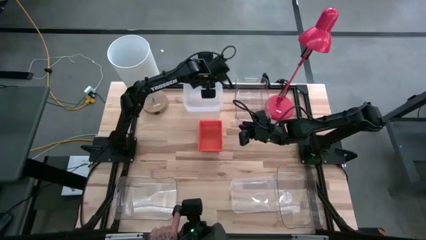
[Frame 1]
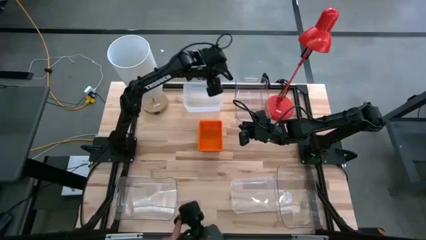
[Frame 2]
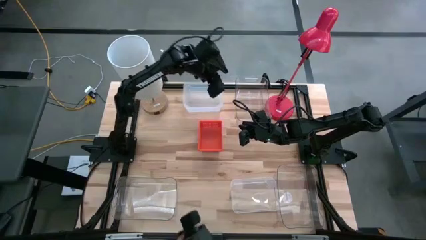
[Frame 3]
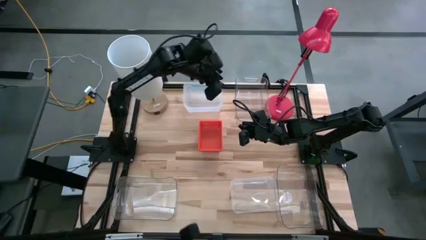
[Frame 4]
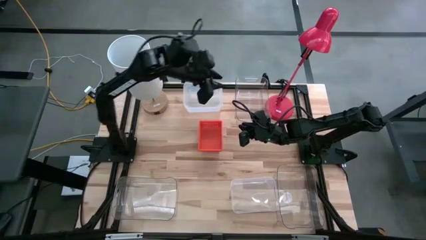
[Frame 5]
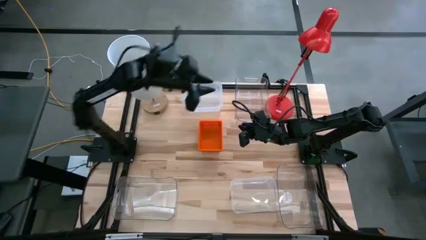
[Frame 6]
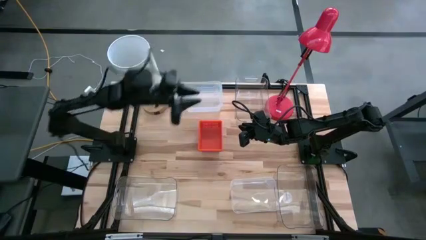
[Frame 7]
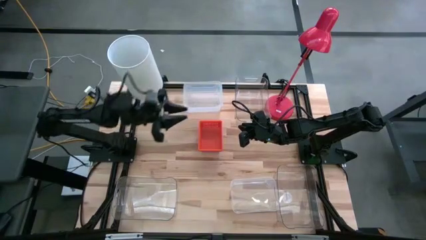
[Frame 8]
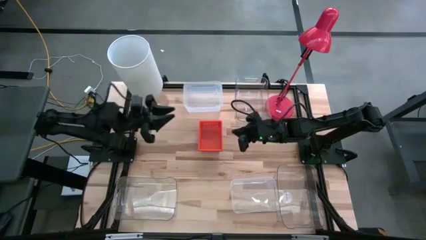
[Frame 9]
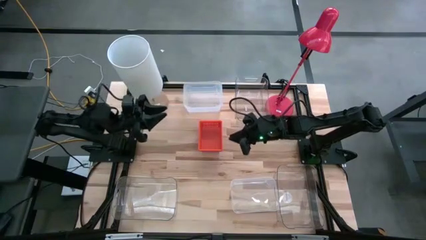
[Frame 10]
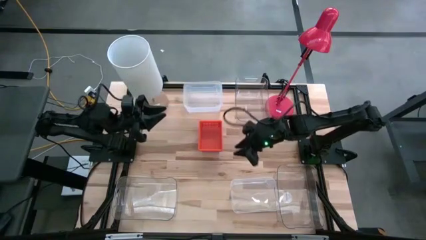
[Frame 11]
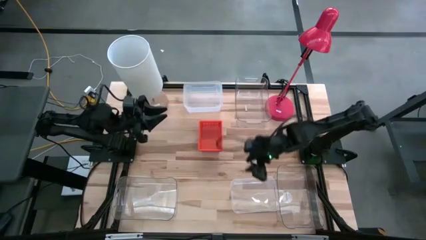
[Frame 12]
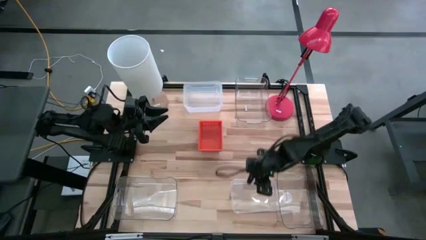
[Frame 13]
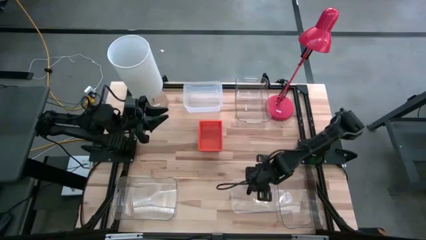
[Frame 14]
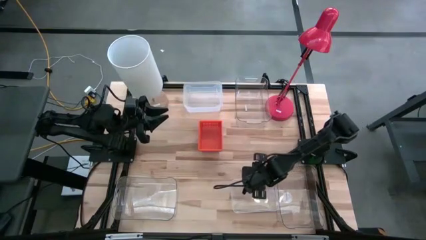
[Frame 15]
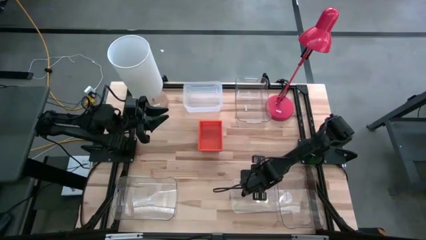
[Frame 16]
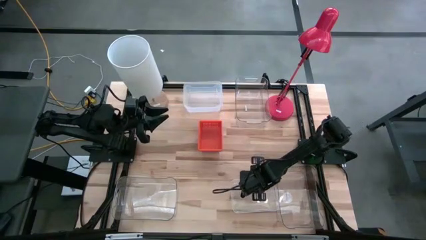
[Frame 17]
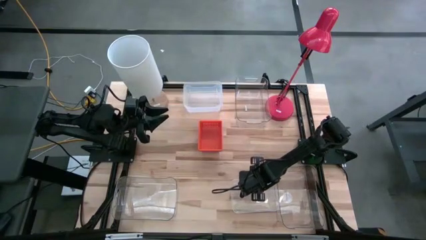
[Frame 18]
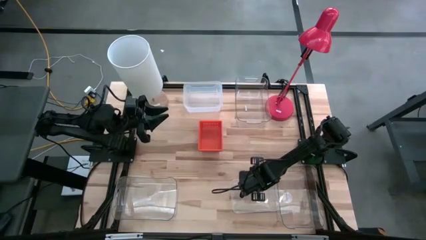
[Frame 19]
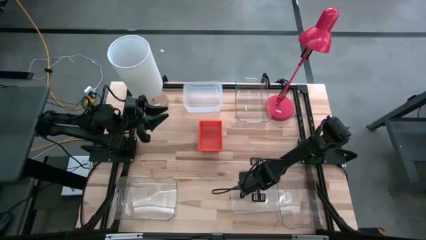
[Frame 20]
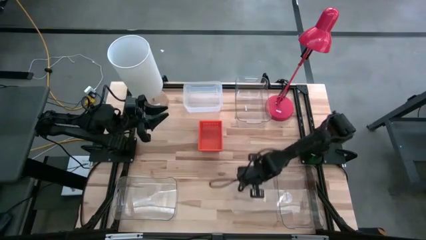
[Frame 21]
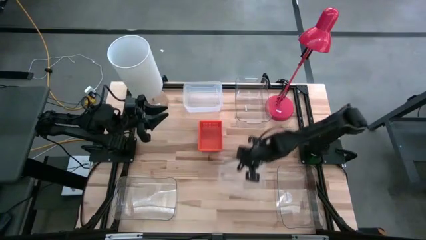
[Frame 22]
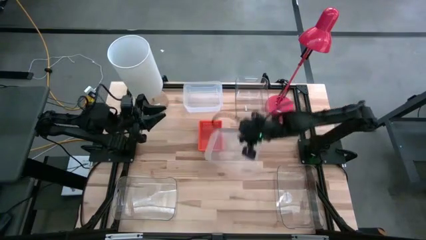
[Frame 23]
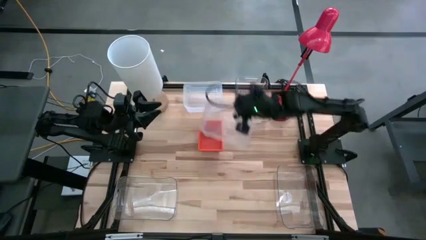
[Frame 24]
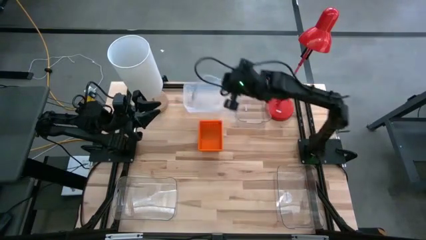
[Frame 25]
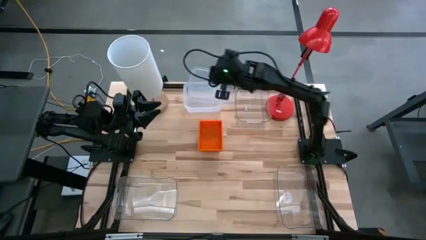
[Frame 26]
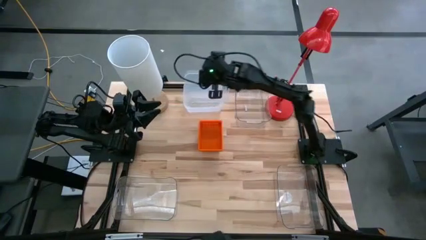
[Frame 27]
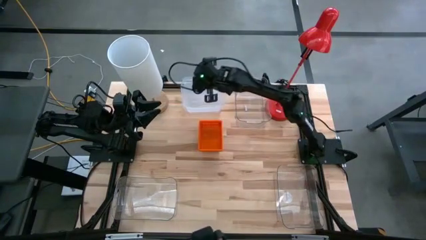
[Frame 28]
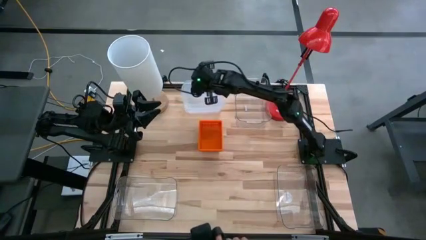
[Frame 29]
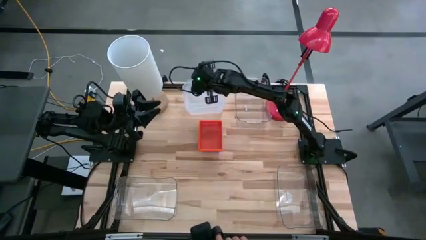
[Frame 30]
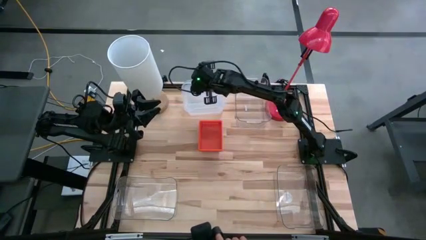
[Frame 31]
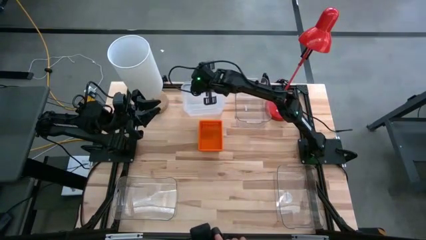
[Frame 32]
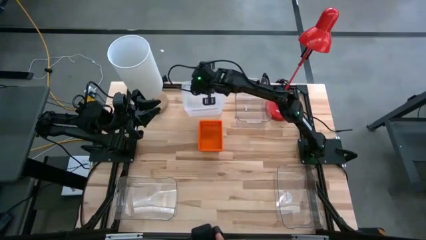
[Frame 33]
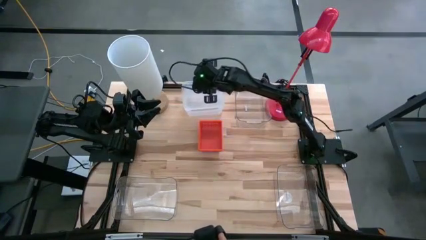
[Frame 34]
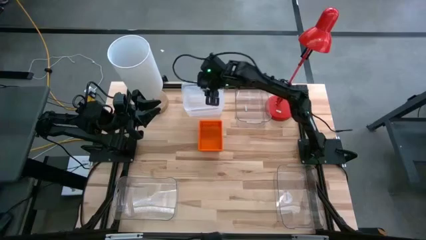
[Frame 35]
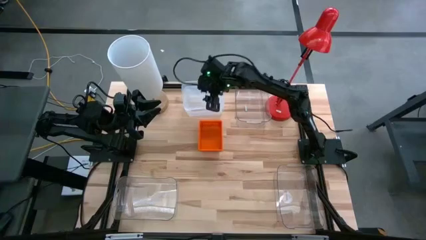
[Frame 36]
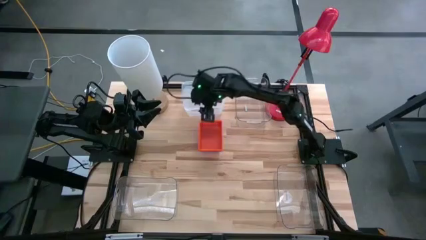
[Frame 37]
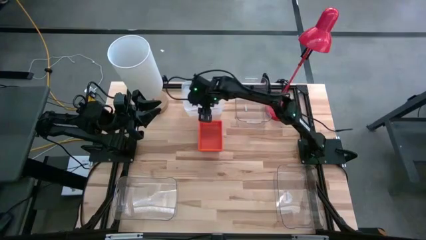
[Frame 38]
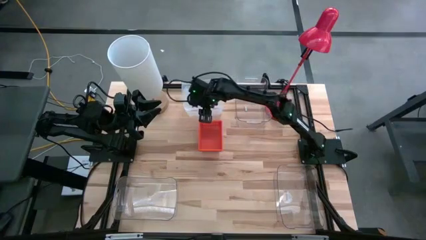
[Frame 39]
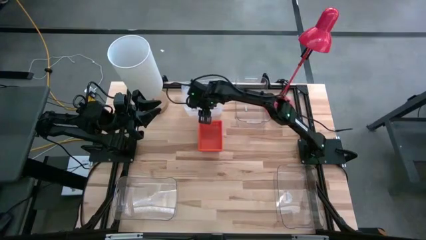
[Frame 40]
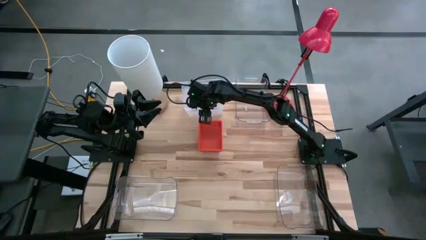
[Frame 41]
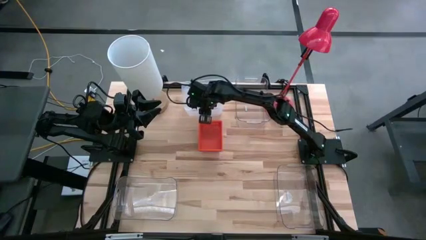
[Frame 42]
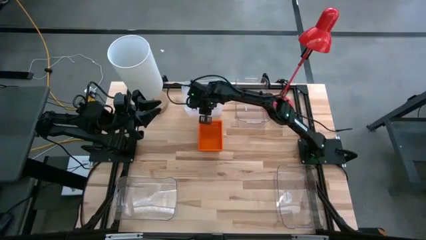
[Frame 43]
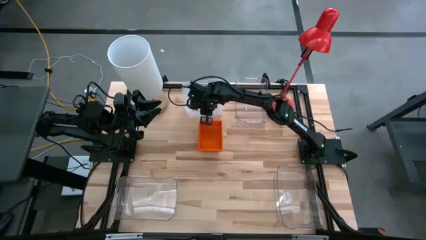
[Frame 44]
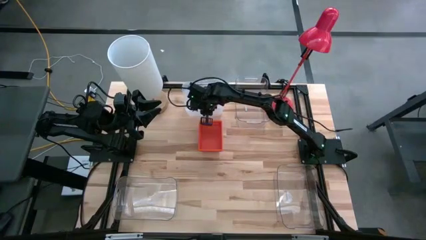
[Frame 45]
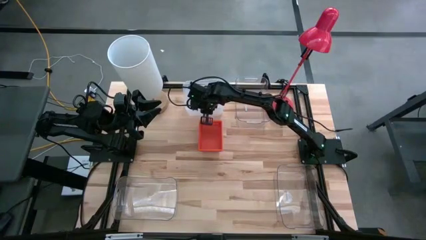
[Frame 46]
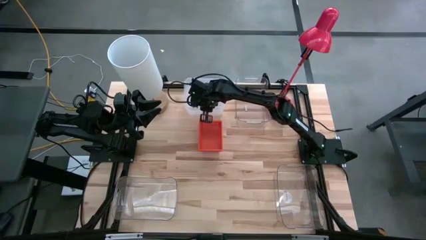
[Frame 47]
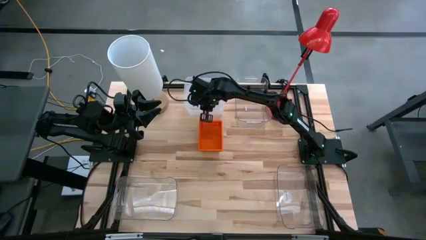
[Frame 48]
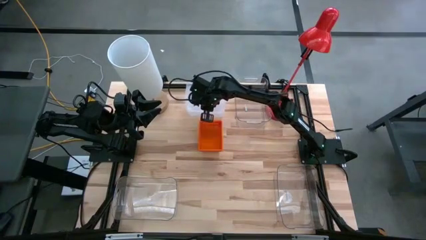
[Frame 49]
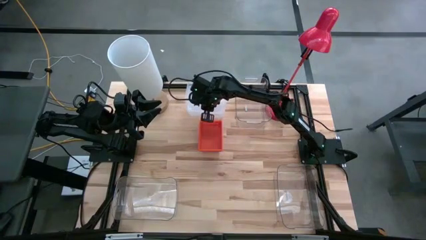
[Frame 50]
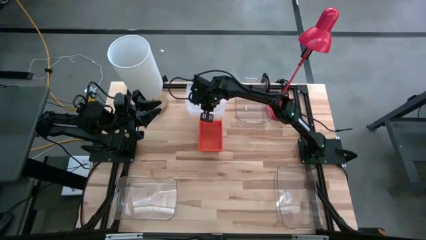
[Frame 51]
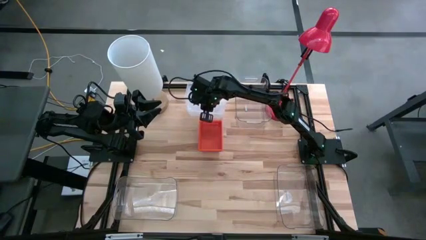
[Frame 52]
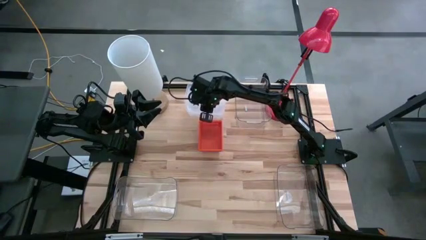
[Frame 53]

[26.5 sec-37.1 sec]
Stack the bottom white bin on the top white bin
